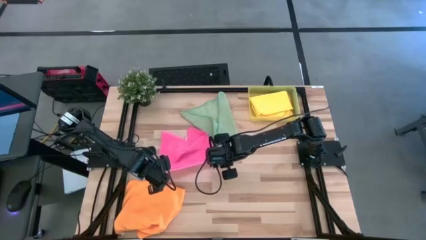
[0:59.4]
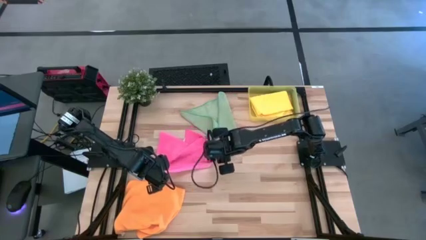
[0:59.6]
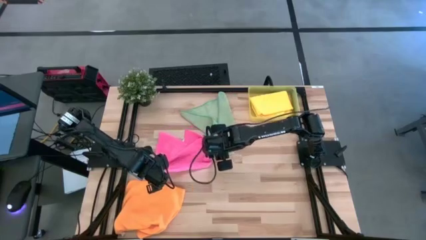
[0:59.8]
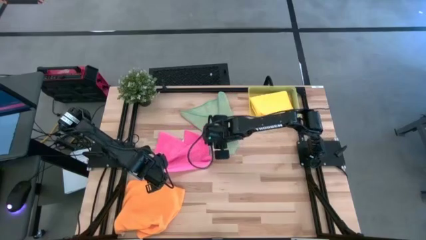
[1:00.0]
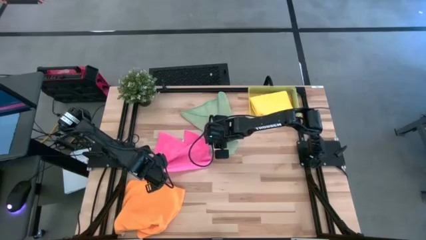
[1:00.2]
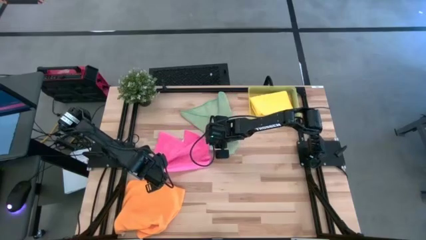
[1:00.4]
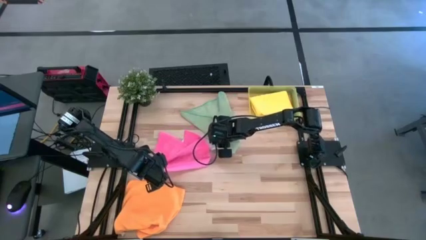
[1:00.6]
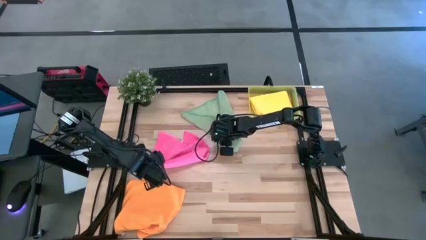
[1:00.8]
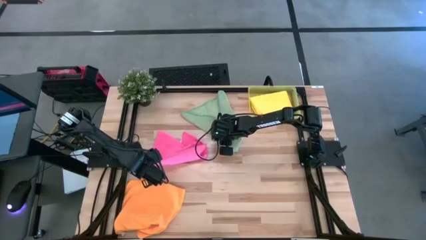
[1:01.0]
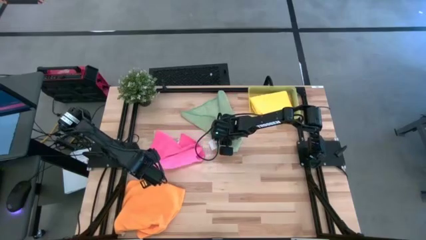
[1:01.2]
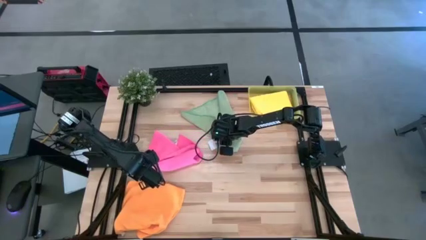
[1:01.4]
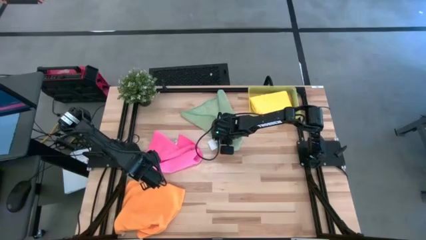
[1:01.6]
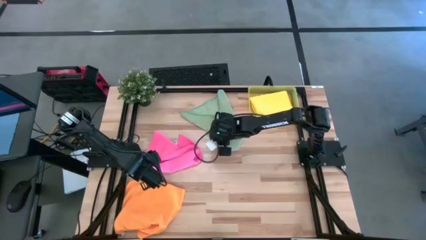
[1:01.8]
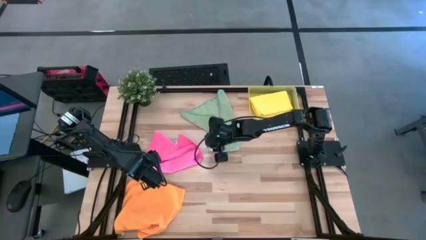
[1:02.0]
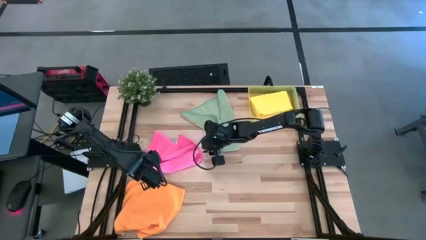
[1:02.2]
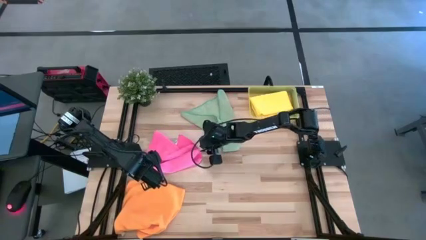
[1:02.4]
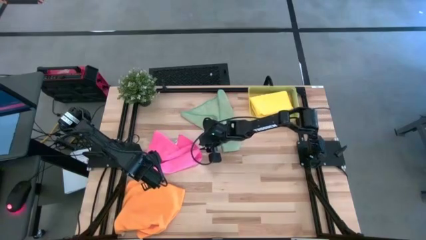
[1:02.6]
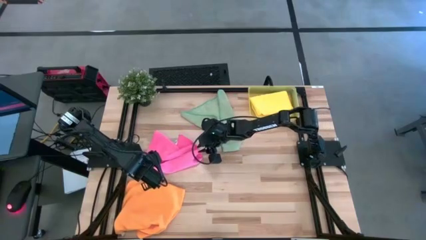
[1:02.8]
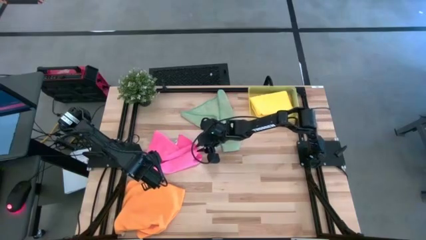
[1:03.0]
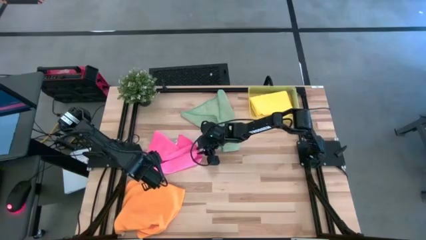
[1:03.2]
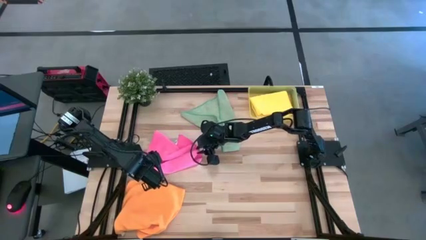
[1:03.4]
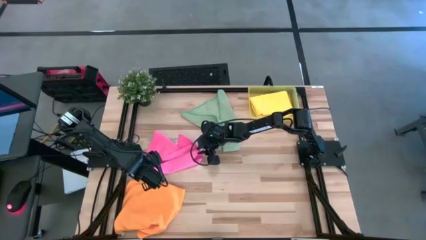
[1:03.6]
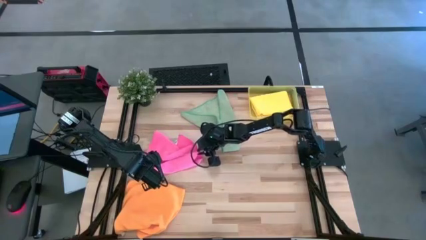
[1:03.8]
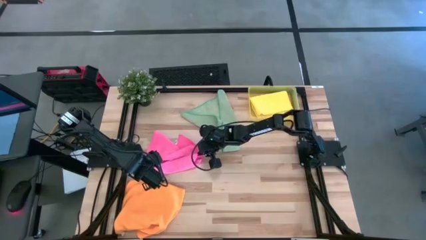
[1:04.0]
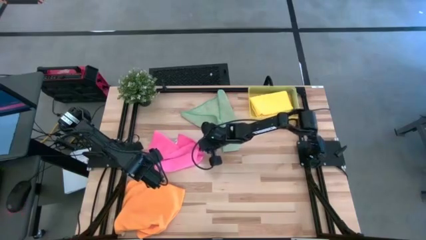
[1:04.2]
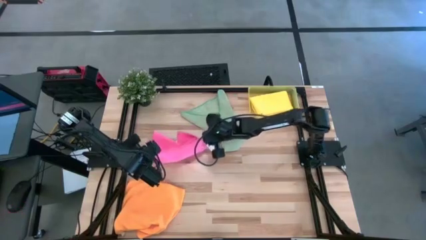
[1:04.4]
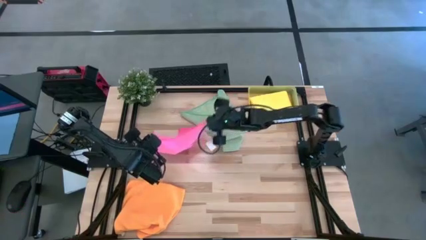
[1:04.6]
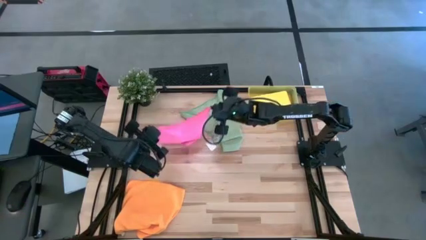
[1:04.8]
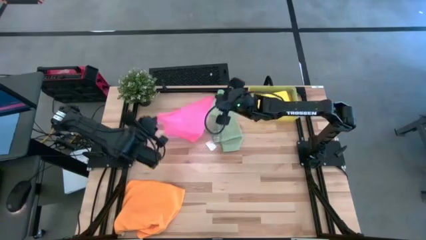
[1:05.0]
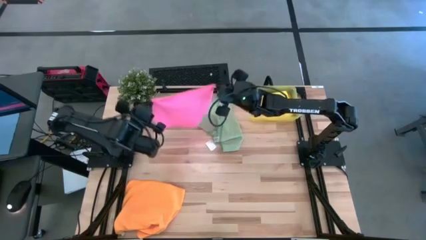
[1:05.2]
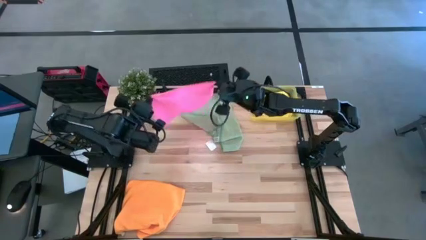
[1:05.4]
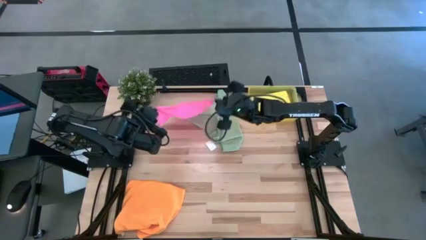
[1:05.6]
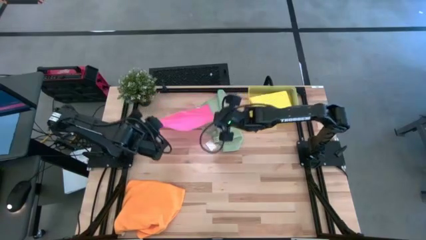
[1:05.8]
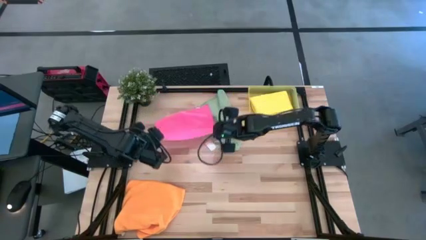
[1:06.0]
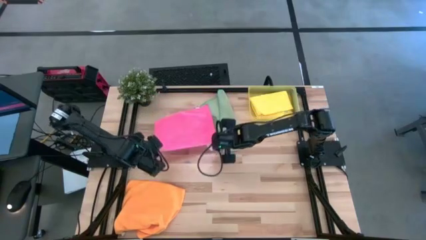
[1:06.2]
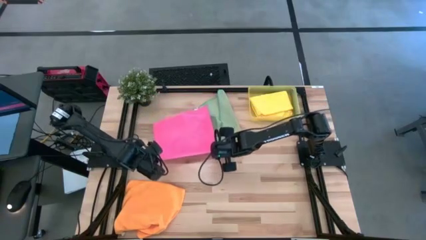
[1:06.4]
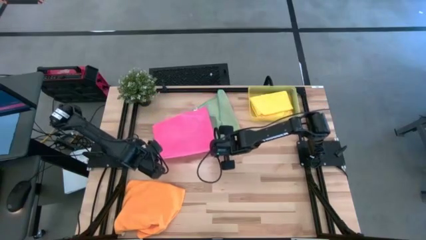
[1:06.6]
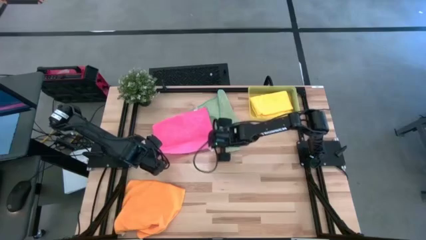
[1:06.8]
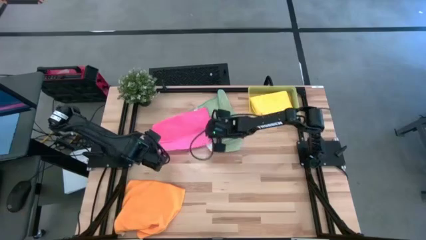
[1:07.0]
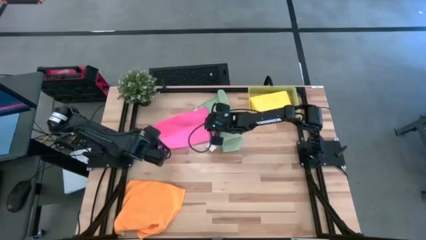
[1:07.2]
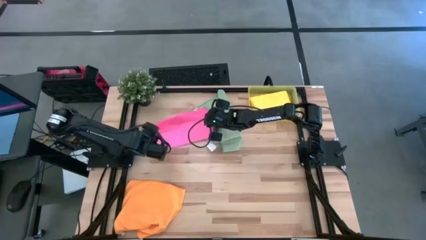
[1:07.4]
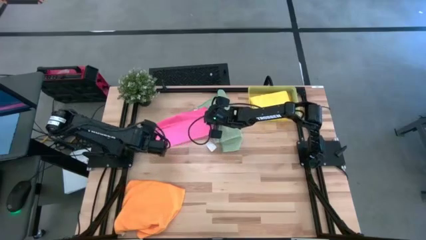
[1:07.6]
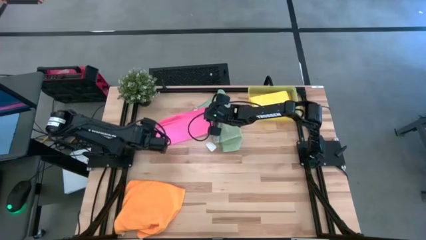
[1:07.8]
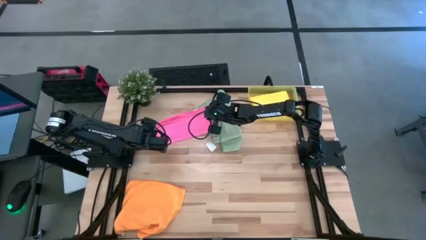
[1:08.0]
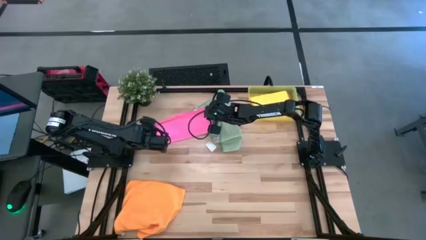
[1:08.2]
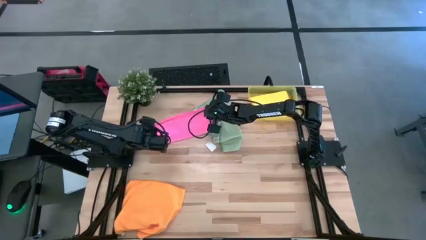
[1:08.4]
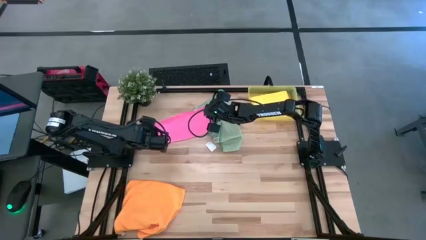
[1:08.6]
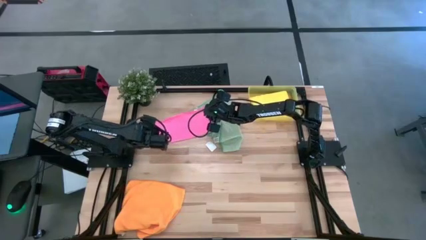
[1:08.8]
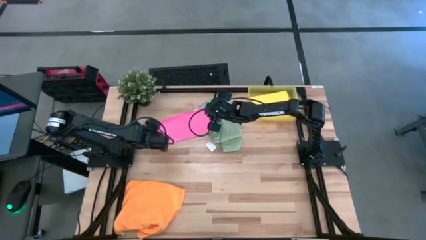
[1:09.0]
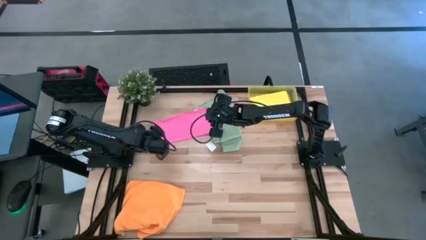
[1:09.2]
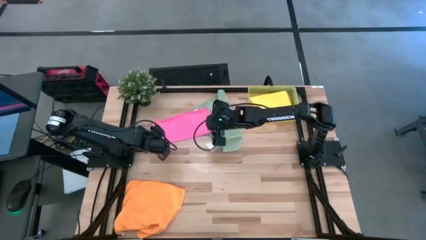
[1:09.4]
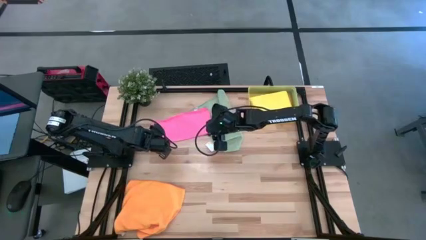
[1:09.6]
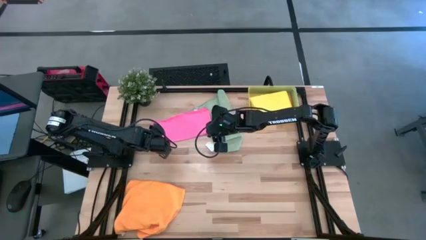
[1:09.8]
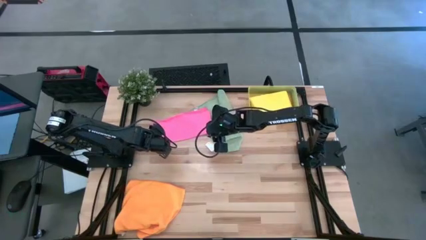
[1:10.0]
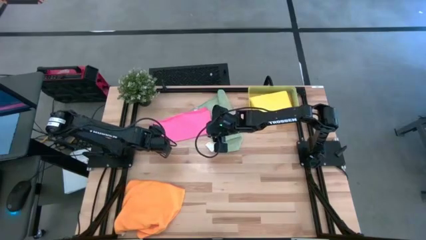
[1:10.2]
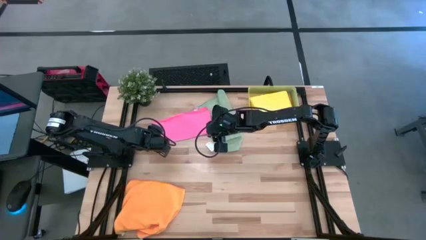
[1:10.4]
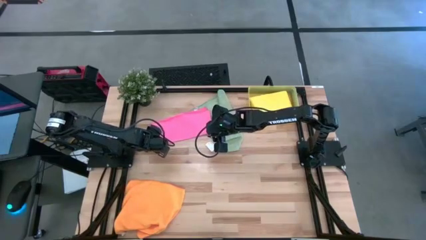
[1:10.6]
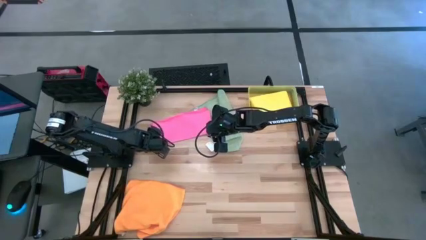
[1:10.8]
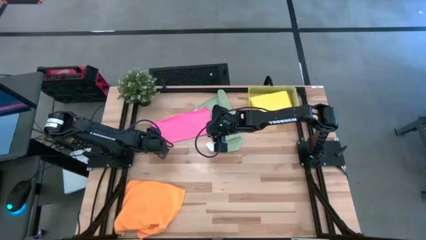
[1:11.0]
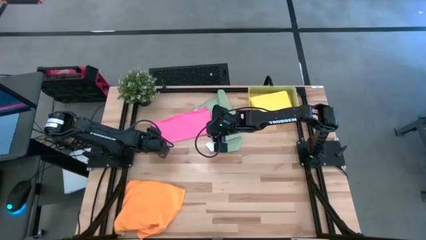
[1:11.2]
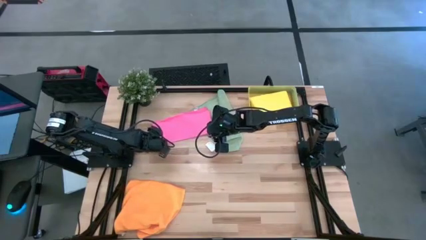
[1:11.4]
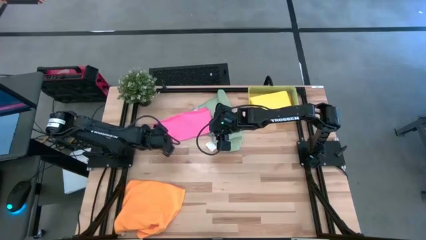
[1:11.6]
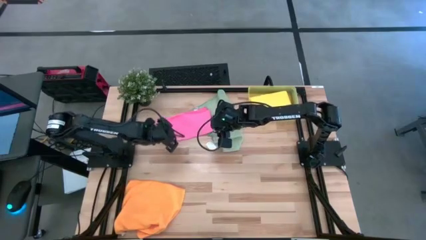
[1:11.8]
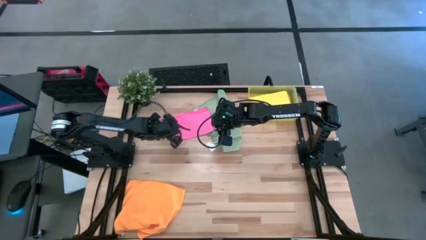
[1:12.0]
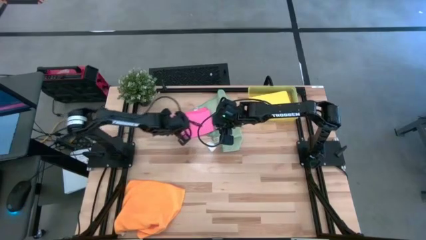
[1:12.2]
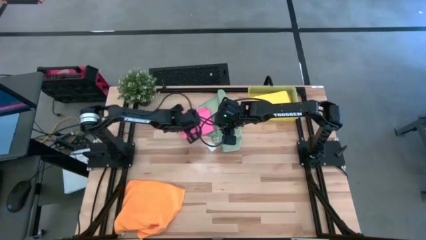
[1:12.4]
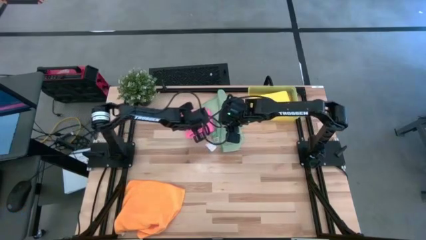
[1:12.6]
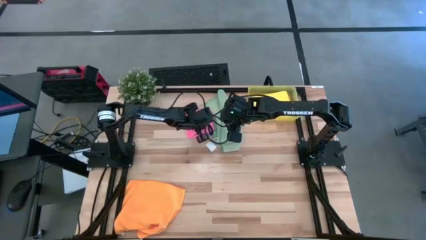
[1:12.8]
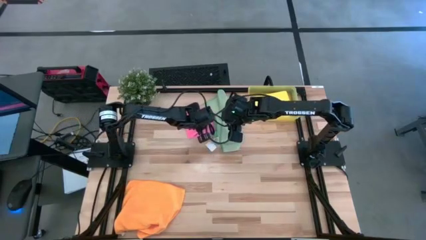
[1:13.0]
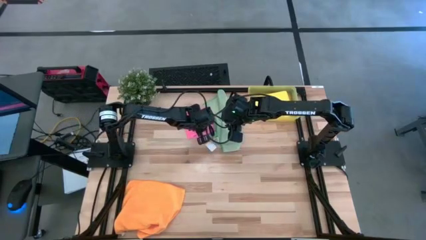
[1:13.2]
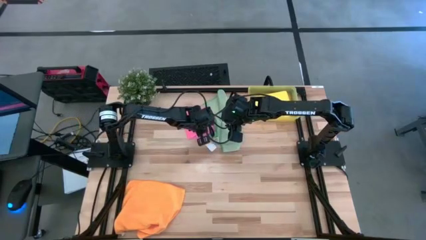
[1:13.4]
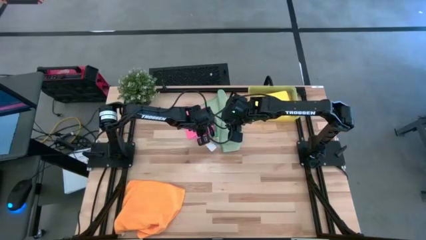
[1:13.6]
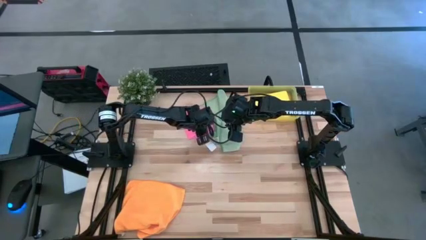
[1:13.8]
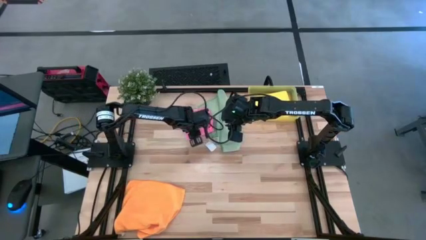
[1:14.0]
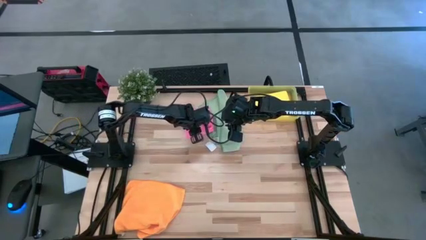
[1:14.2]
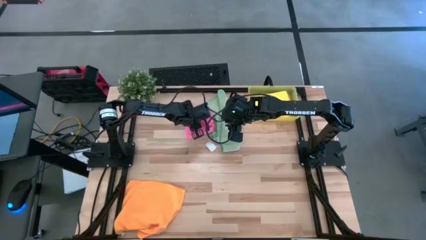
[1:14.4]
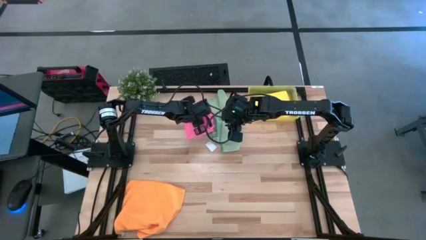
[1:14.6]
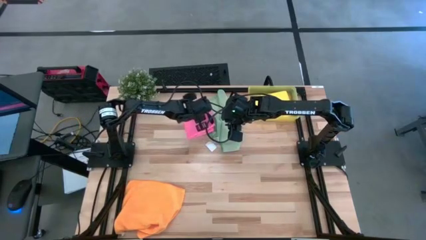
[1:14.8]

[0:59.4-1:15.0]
Task: Fold microfiber towels
Fold the pink towel

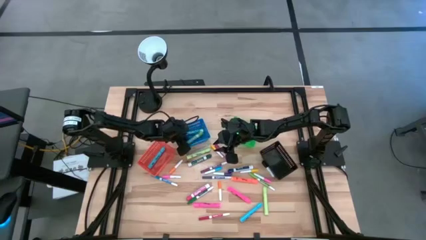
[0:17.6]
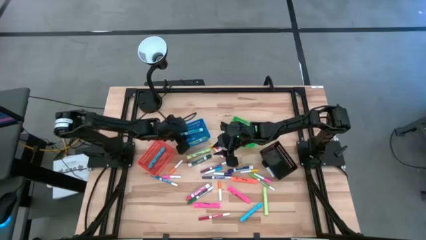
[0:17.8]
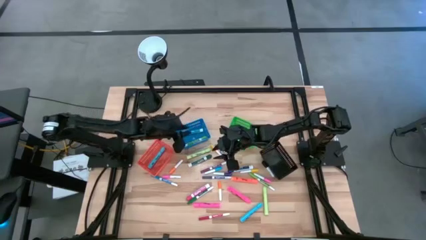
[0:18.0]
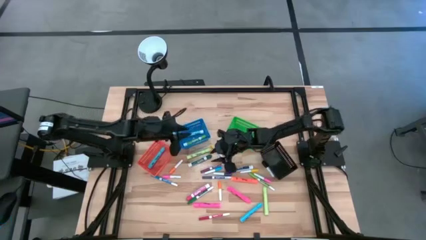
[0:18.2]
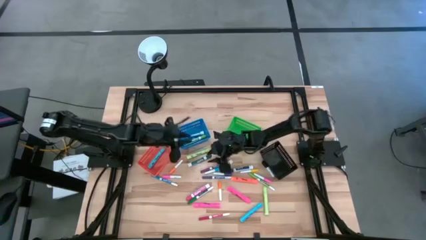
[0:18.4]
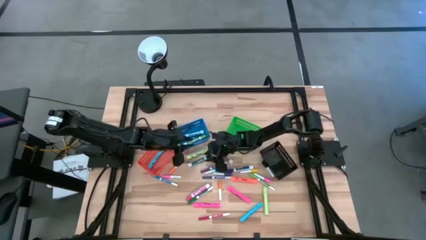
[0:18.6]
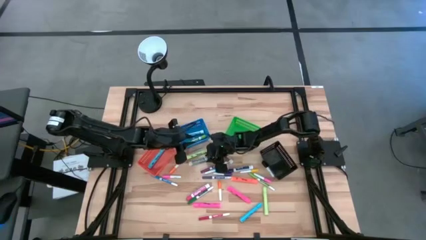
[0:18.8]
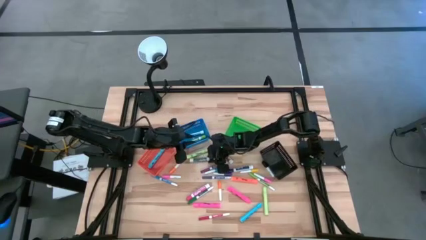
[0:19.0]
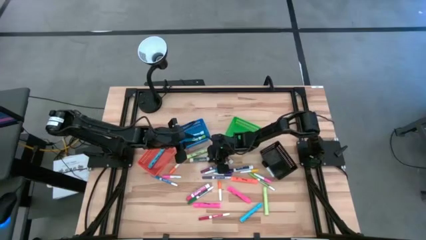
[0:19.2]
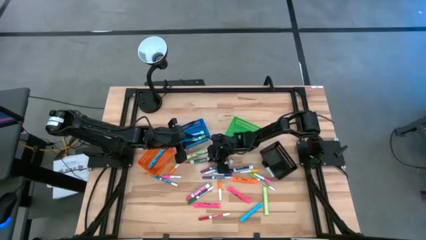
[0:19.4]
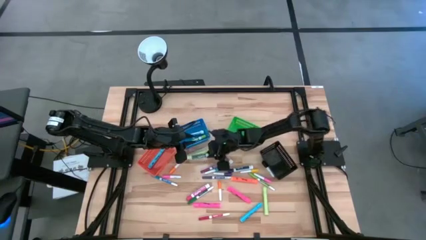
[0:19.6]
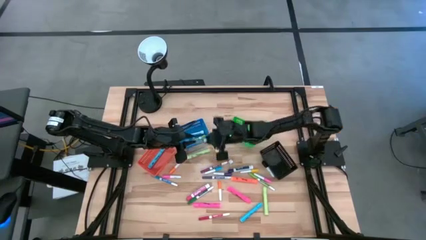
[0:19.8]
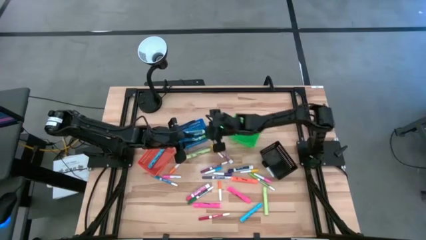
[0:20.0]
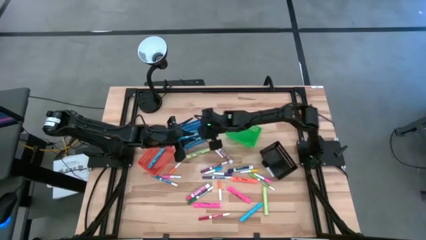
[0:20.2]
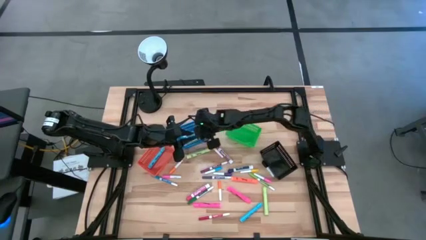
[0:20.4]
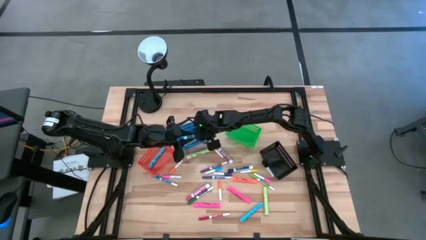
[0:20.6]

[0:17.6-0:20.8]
Task: Pick & Place Markers
Put the top dark green marker pen into the blue basket
